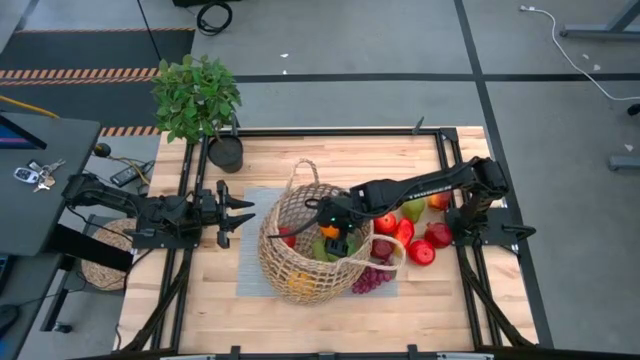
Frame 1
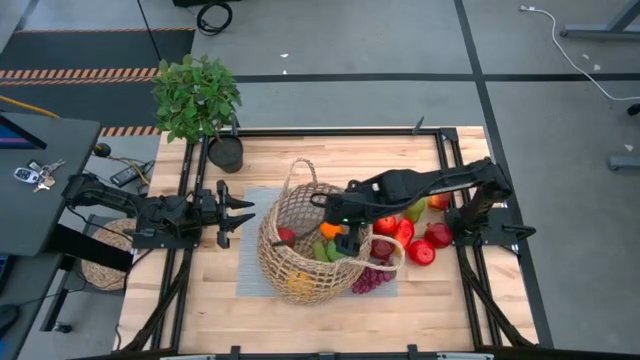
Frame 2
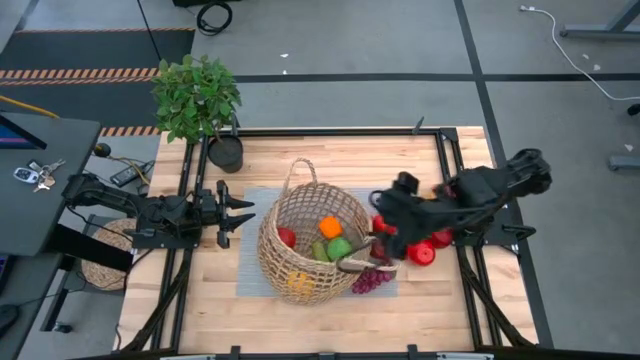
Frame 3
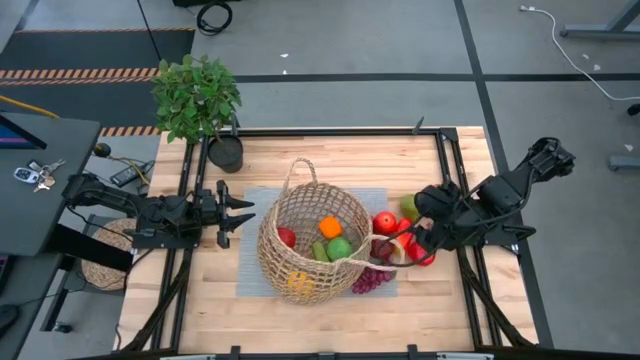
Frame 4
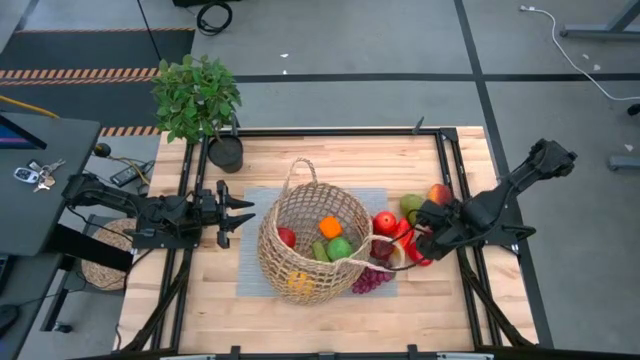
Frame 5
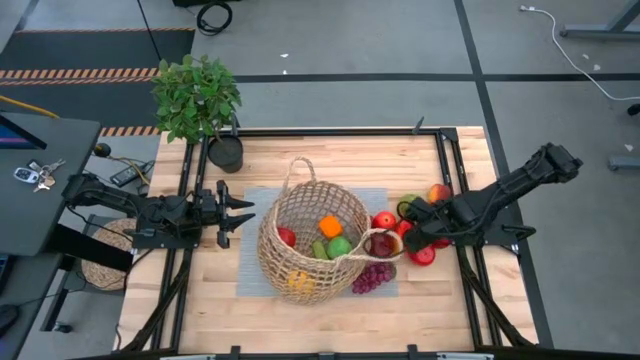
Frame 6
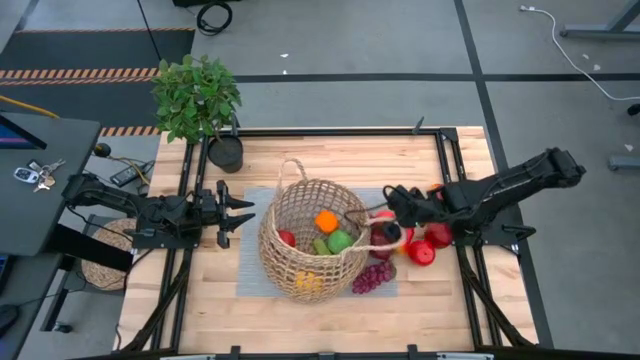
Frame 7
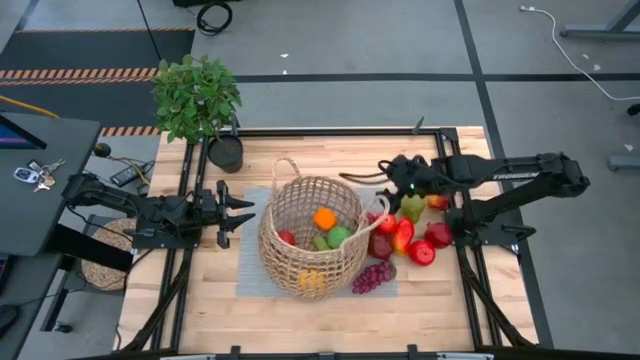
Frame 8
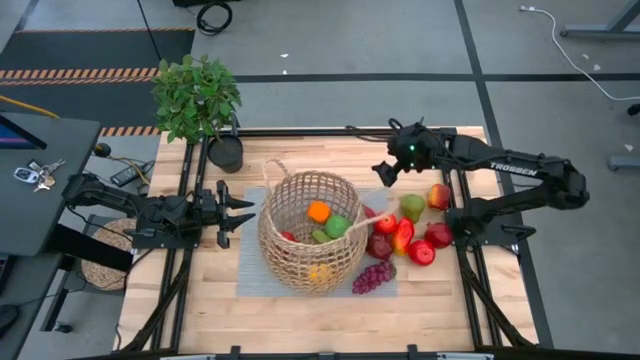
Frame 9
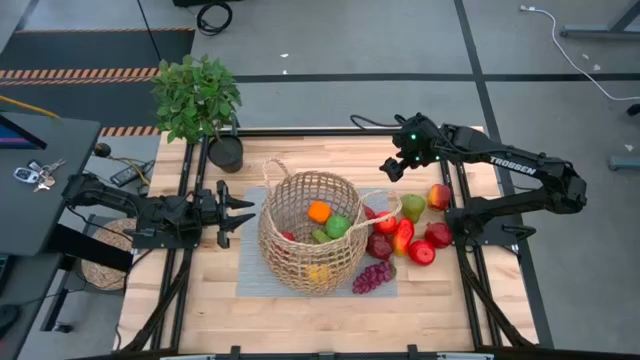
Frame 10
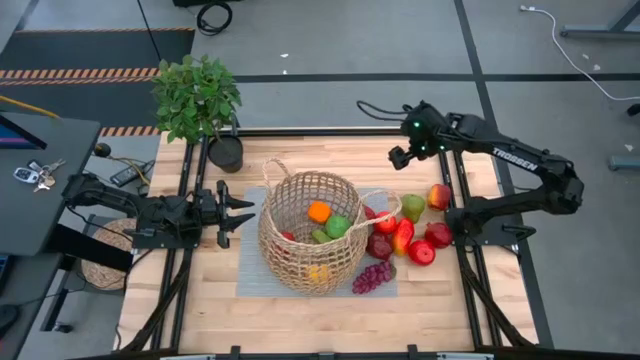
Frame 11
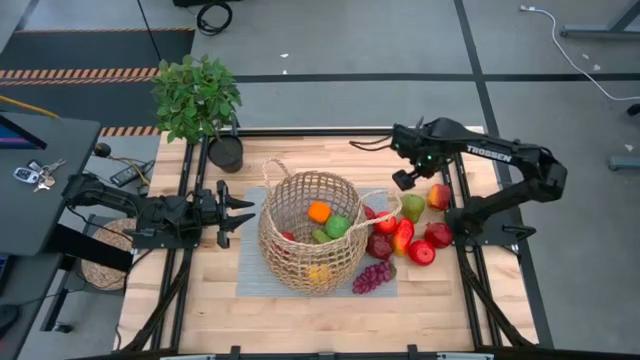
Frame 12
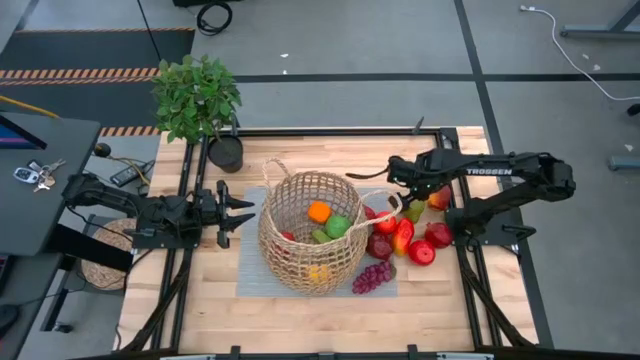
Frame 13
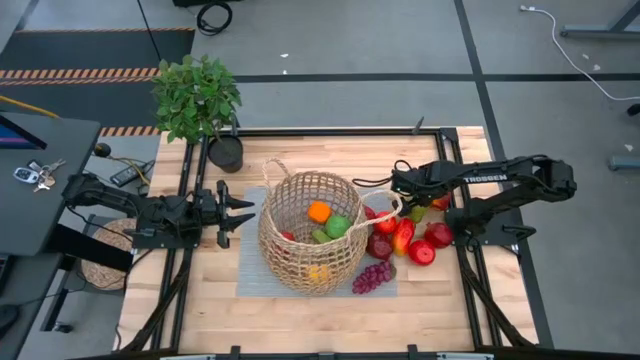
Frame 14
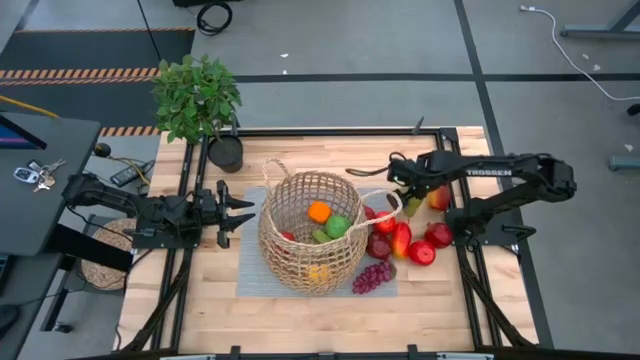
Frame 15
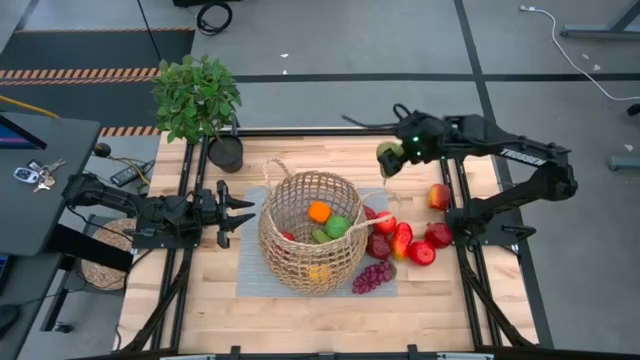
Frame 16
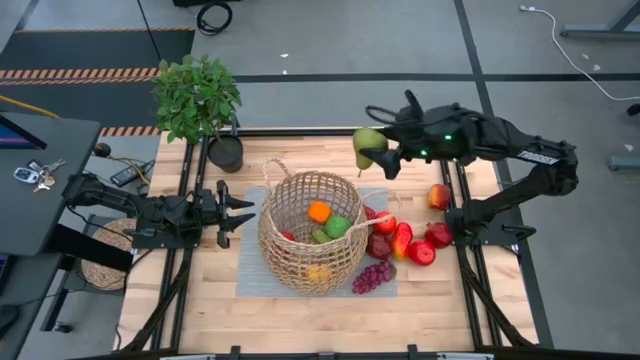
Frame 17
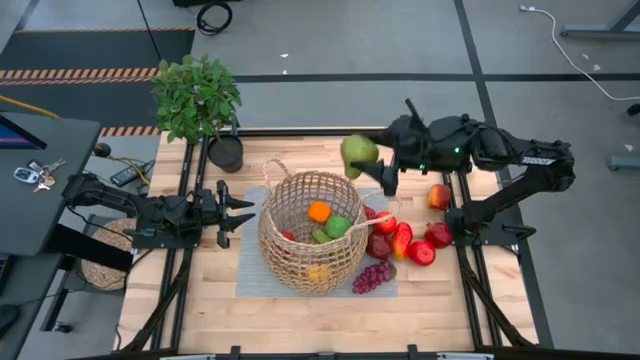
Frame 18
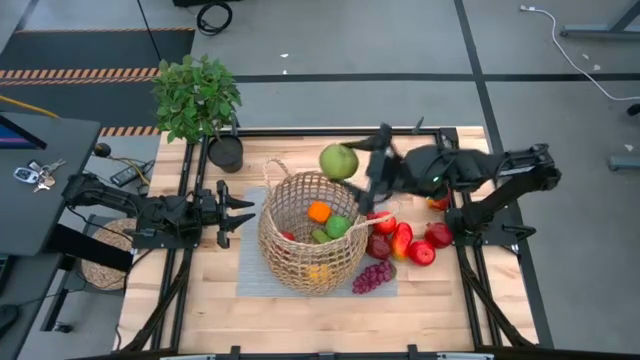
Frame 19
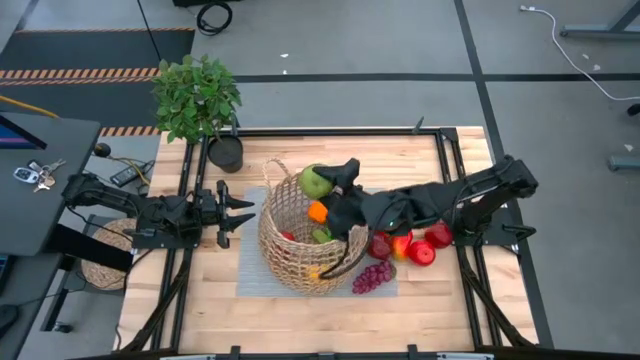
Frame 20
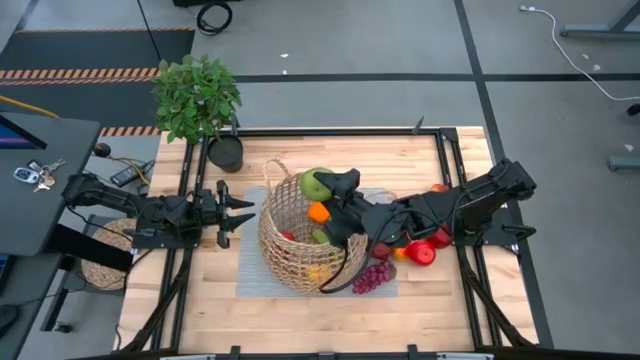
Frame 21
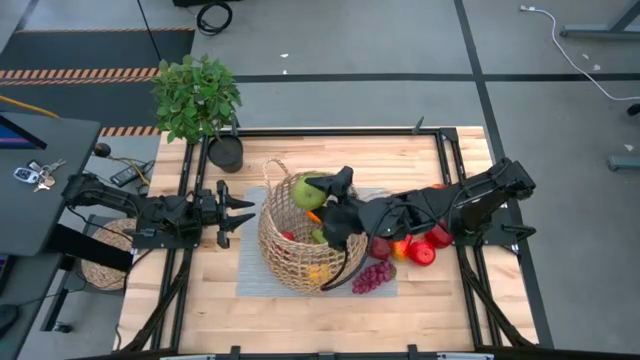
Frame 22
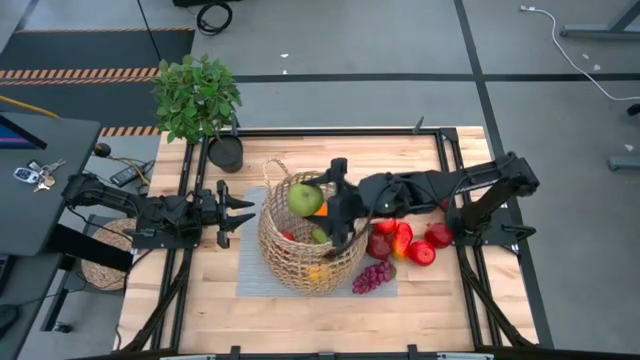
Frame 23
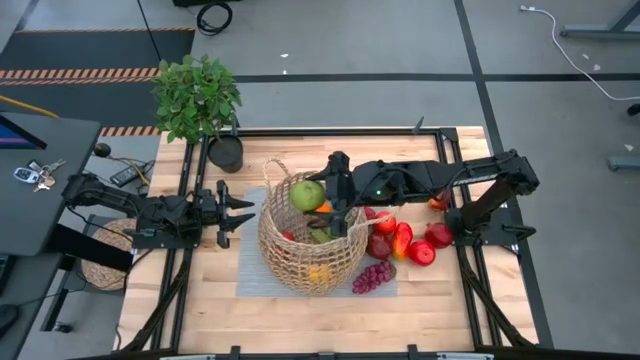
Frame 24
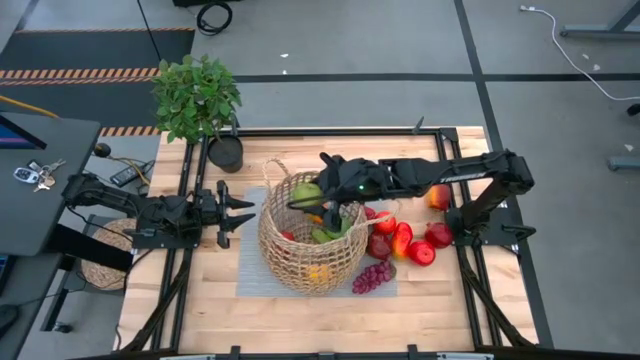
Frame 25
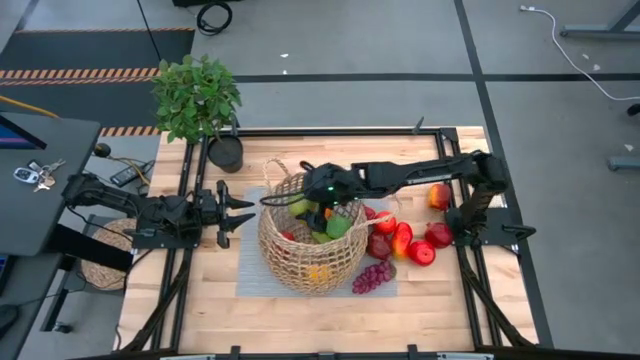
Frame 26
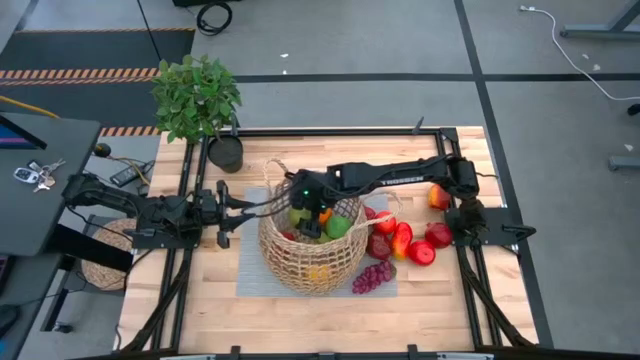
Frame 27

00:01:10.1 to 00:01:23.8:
Task: Build produce basket
Put the pear into the basket

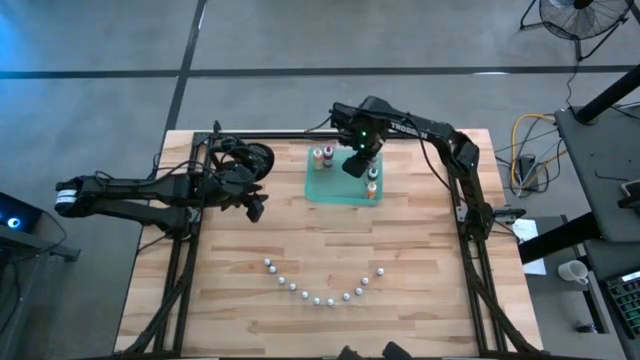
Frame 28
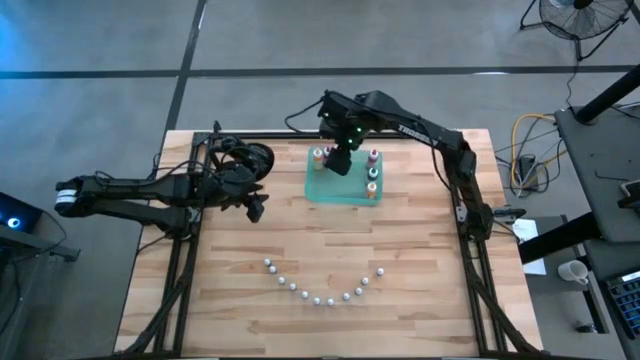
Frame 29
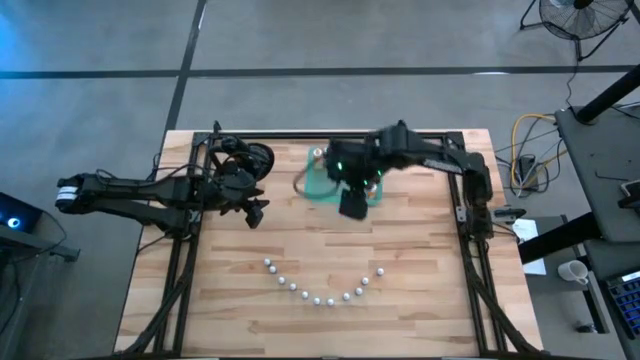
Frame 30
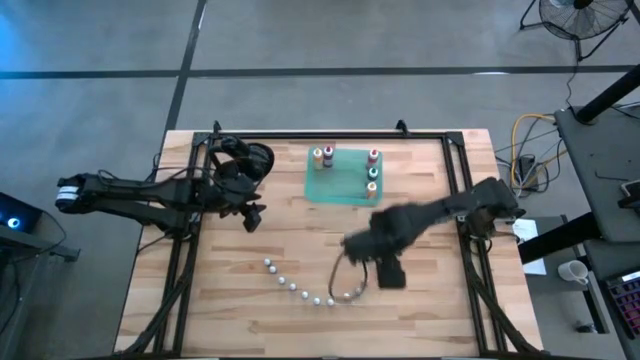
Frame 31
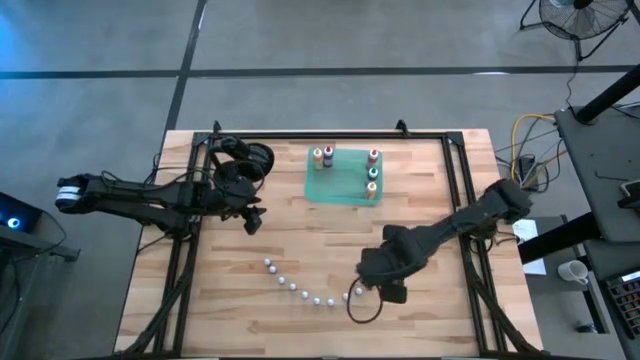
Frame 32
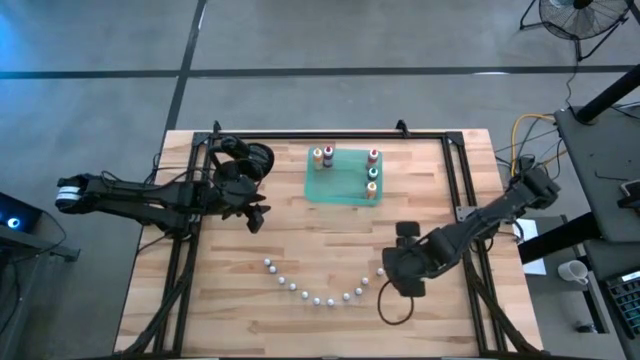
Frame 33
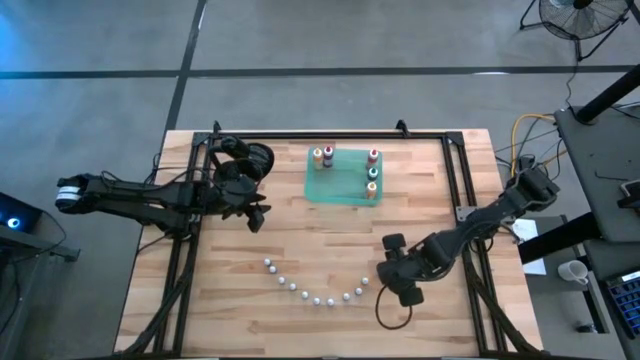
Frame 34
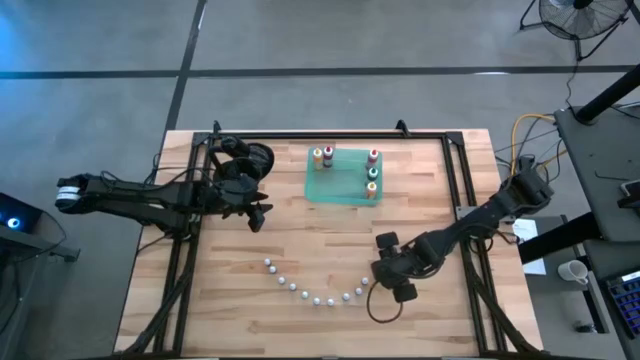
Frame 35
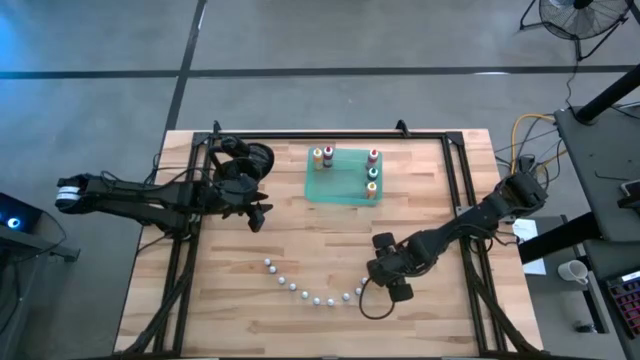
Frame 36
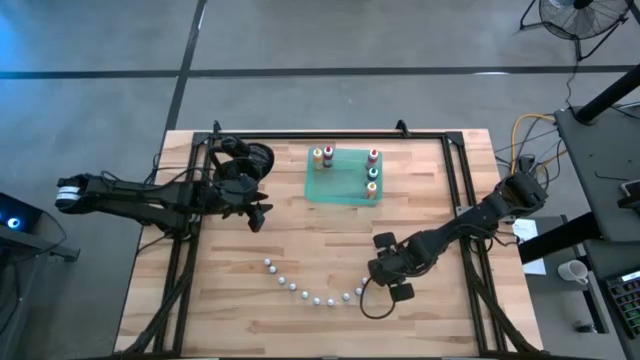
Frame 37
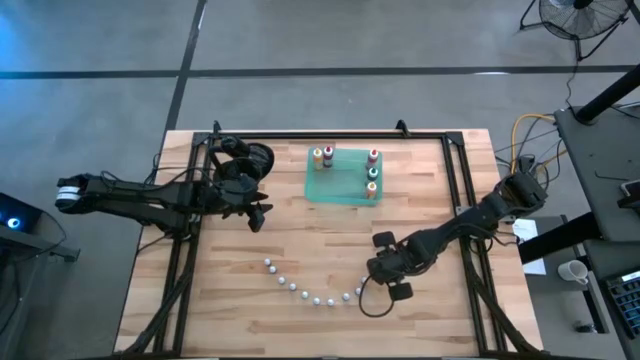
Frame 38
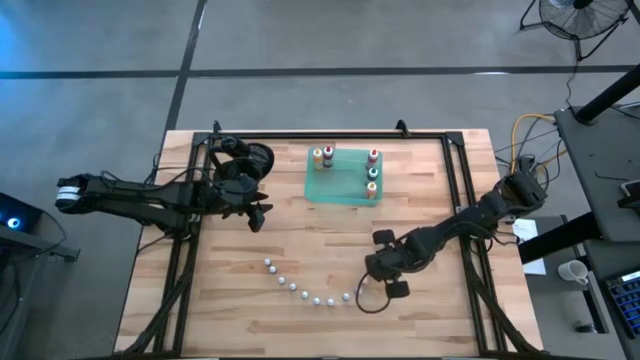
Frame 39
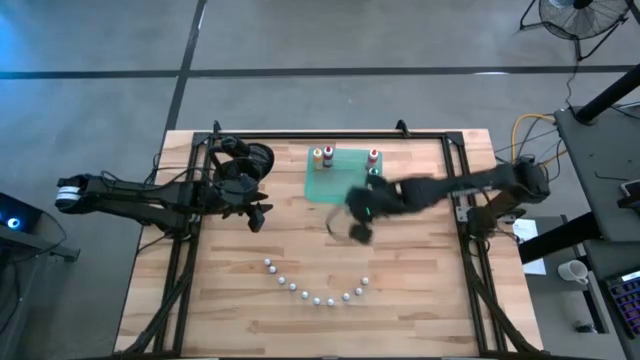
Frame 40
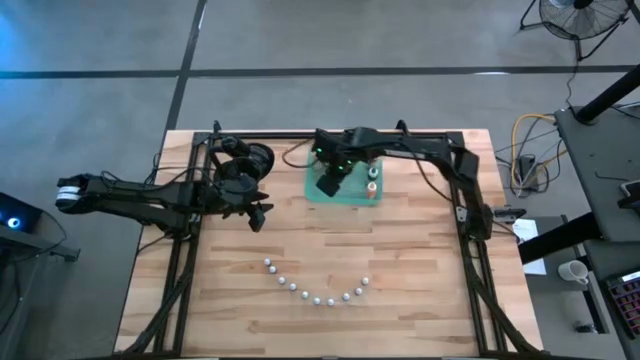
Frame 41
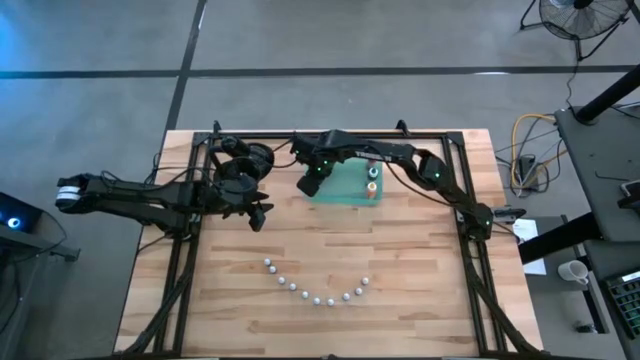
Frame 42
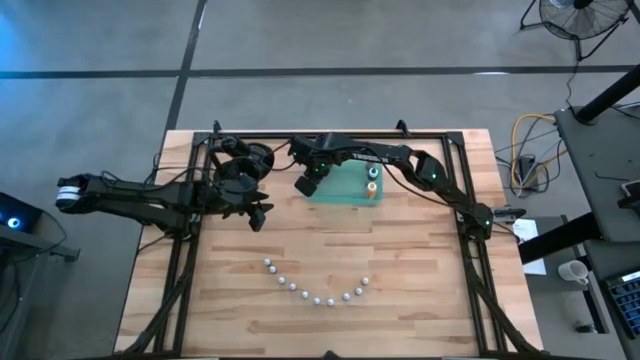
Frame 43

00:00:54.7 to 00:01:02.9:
Task: Pick & Place food coloring
Put the small orange food coloring bottle into the green bin
